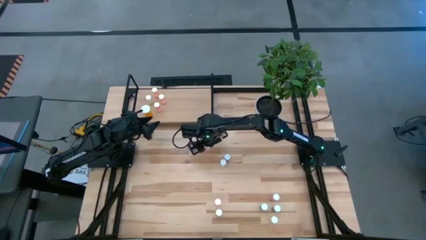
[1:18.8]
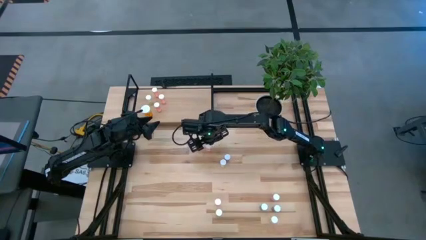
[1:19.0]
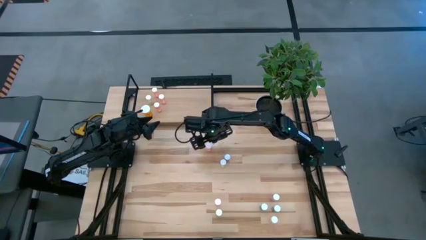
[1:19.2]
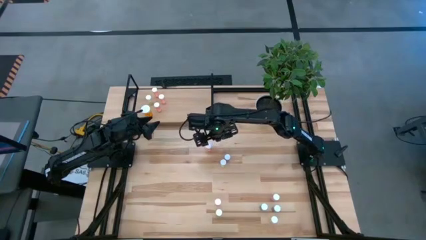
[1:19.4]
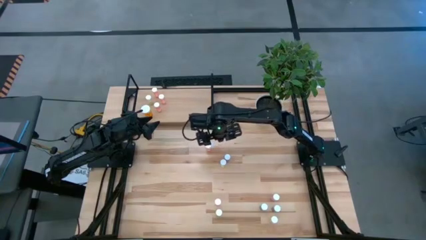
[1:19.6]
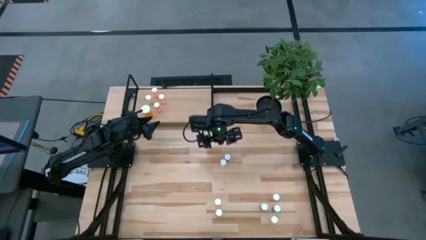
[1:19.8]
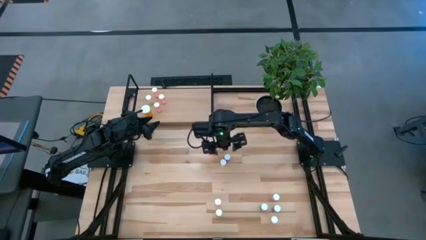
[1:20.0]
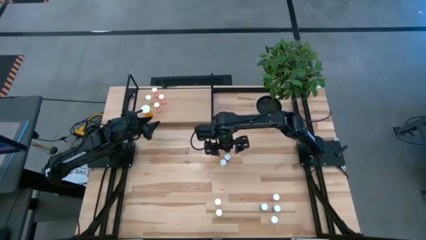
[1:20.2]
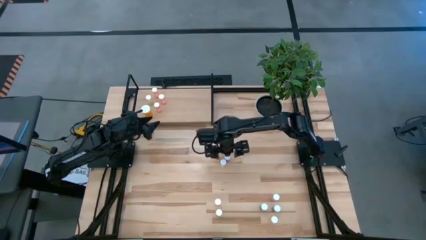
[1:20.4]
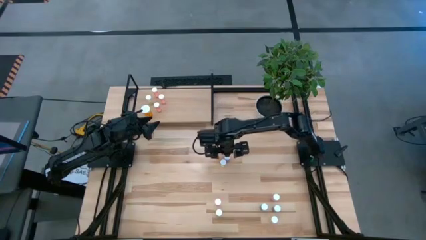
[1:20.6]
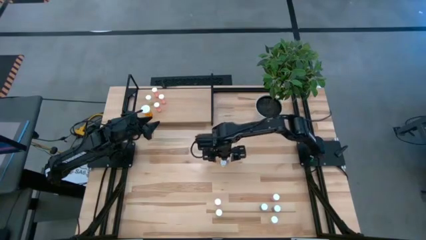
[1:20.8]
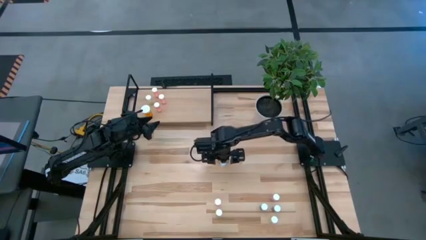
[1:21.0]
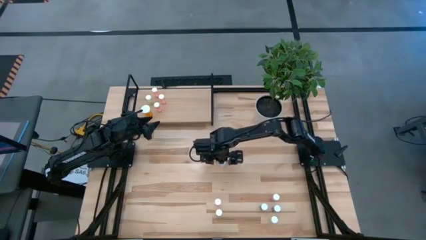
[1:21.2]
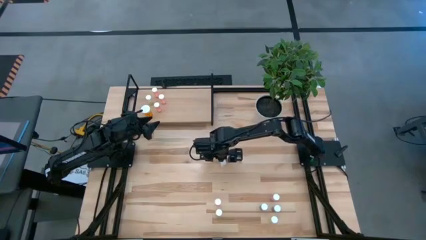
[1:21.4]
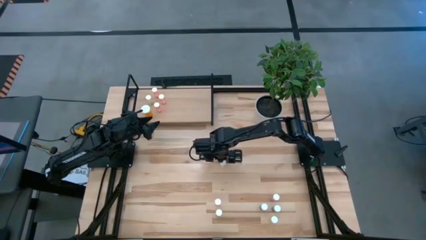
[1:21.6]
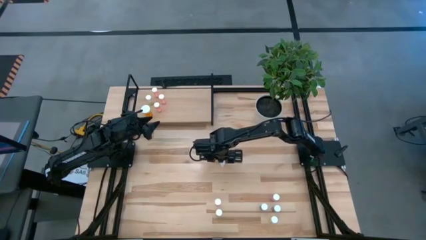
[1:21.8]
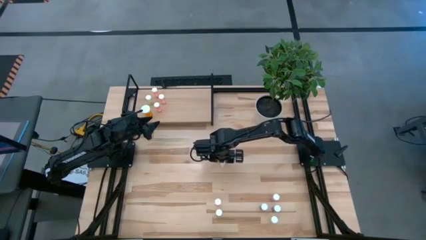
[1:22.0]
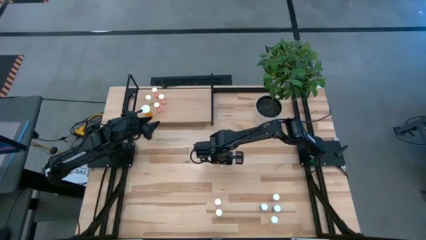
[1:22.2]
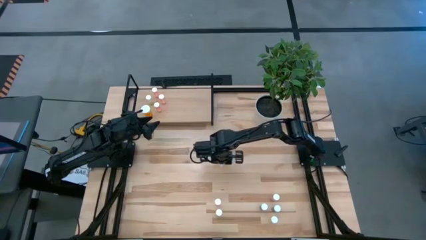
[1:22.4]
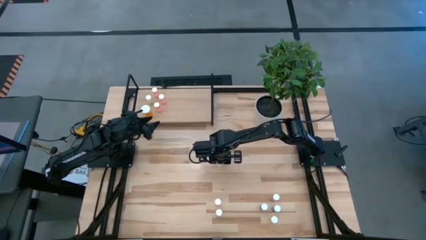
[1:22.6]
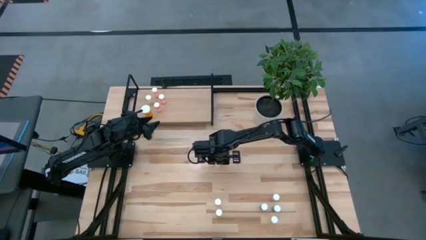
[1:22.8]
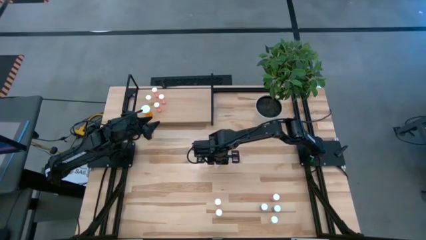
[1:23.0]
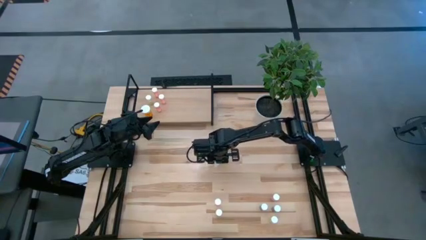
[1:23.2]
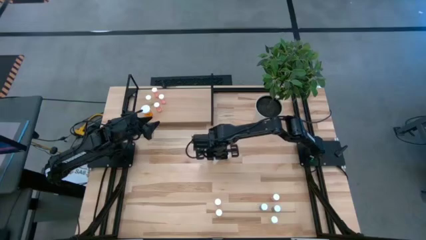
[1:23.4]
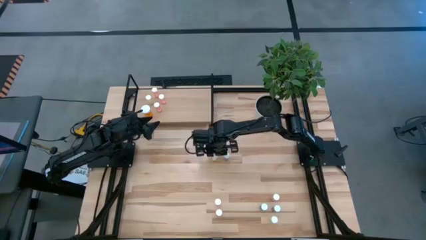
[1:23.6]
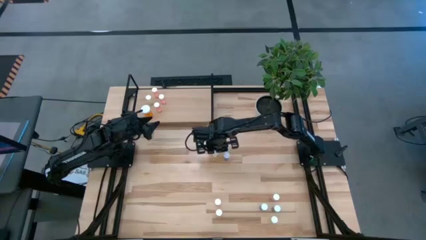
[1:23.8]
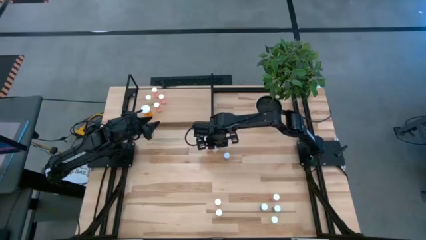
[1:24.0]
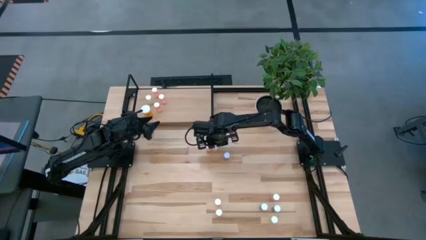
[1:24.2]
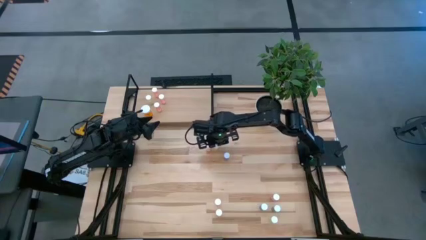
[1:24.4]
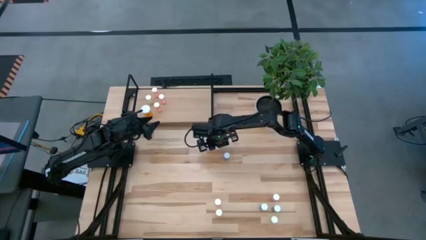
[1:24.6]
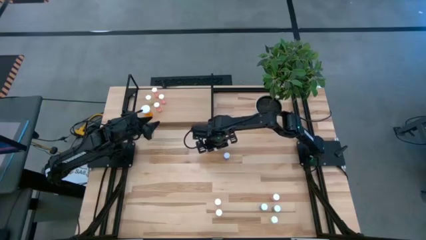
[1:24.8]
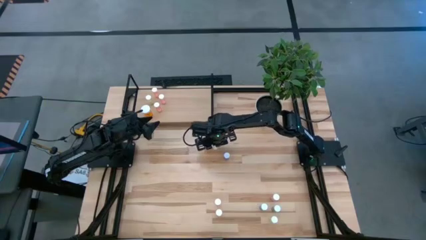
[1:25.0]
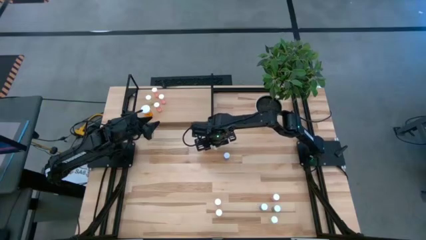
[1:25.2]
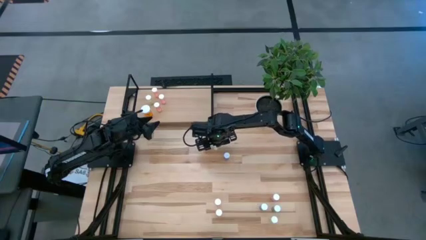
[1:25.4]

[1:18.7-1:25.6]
Task: Pick and place medicine bottles onto shelf by color
Adjust the yellow pill bottle

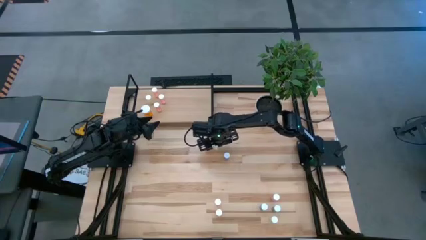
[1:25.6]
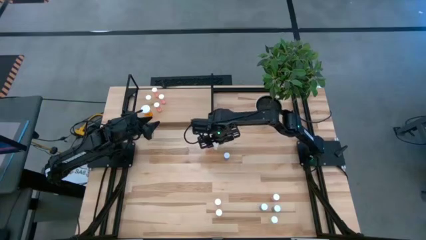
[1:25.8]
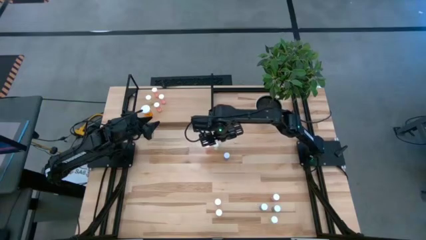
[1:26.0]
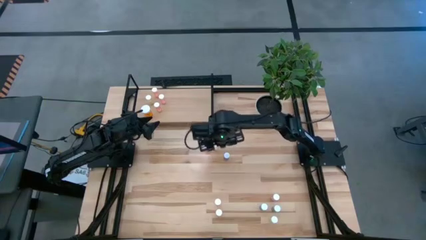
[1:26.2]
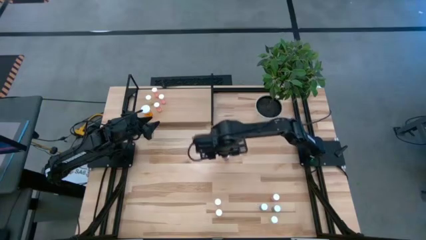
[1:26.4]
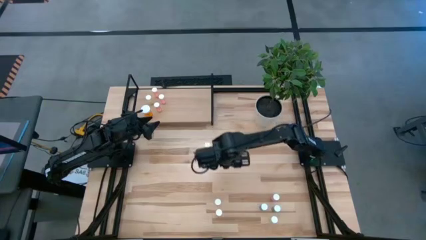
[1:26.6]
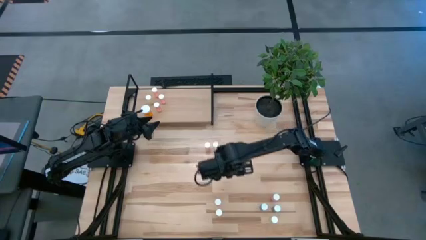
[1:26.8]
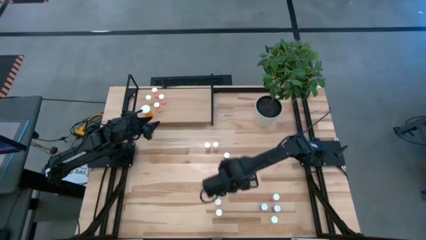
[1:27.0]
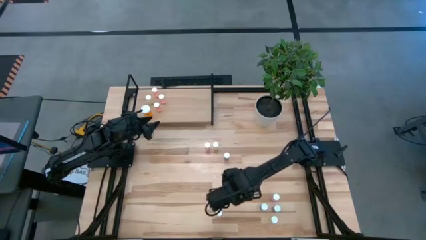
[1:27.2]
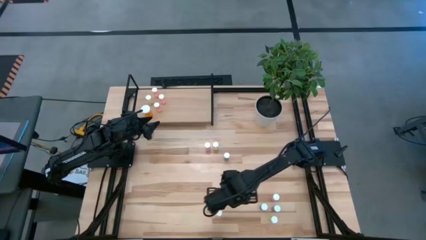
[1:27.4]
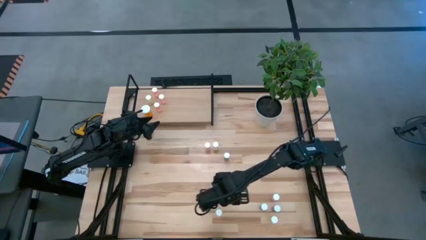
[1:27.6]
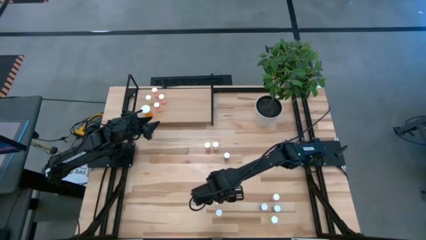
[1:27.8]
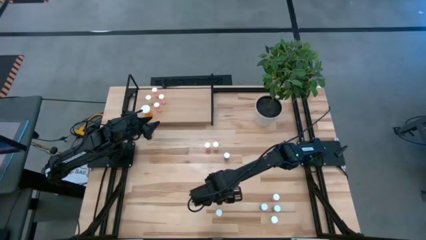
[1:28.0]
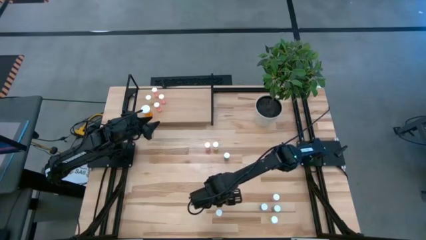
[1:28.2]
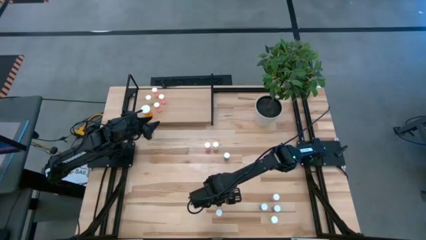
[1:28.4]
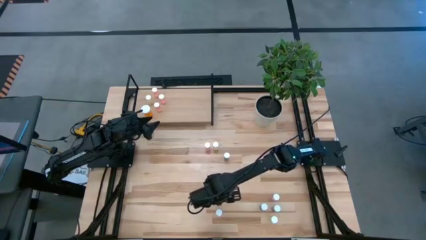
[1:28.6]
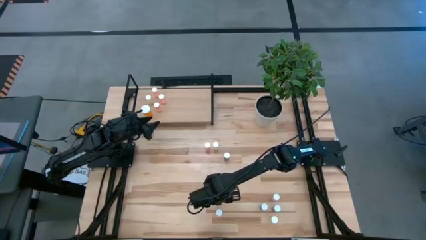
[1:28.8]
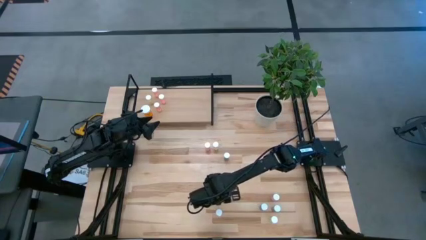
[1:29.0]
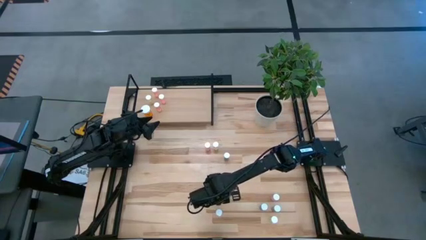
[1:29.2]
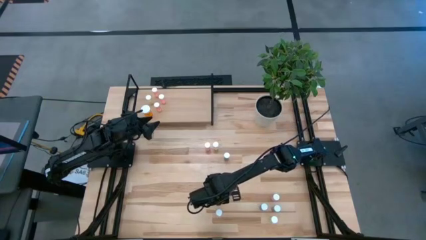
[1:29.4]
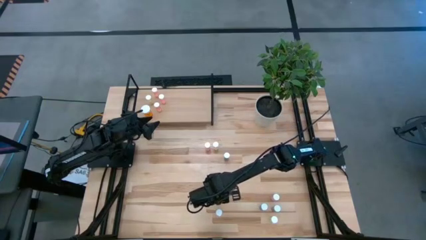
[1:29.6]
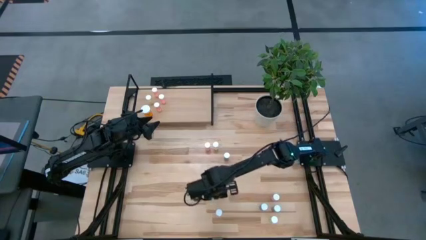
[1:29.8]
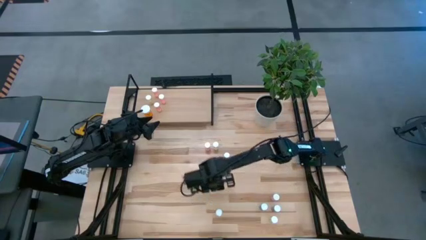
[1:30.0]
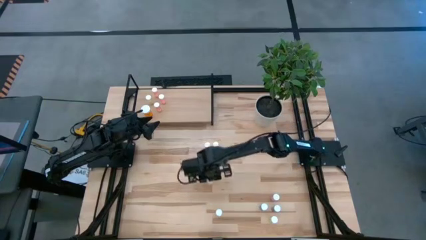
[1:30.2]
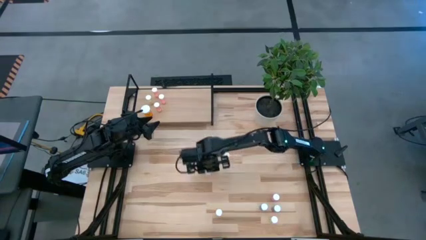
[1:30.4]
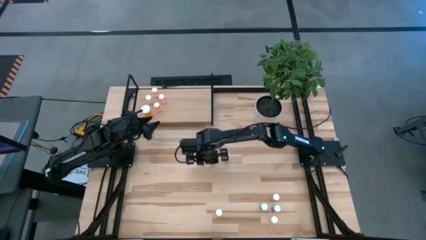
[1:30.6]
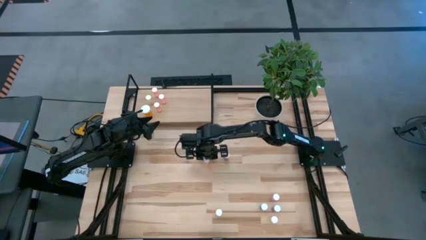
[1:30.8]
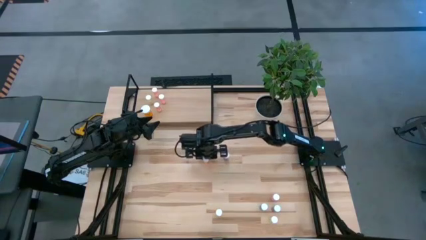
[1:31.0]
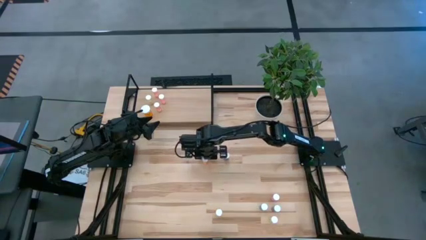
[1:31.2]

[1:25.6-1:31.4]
Move the orange pill bottle to the center
